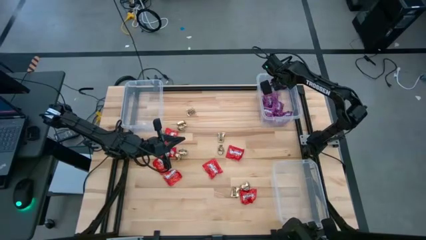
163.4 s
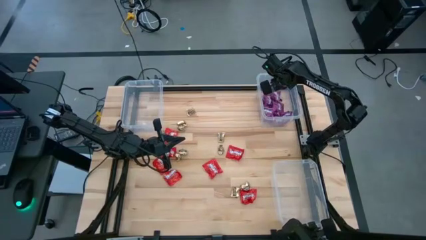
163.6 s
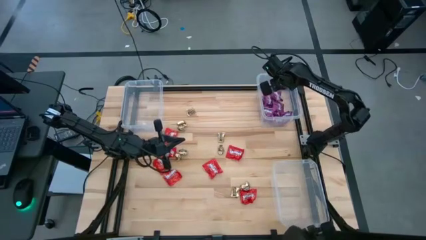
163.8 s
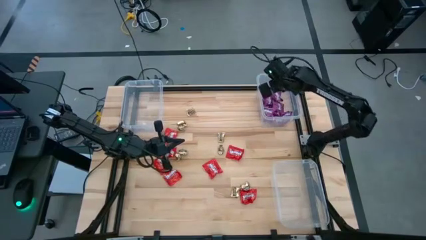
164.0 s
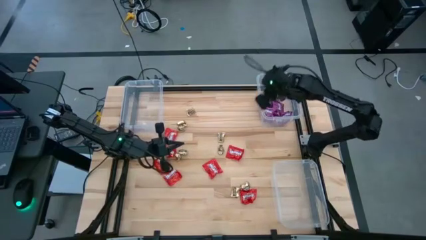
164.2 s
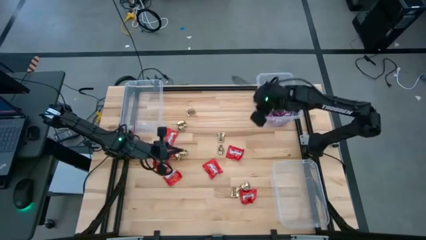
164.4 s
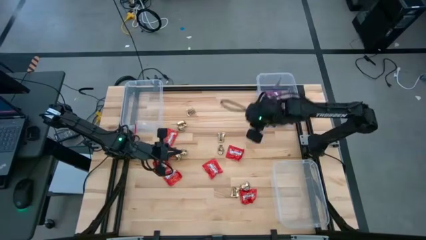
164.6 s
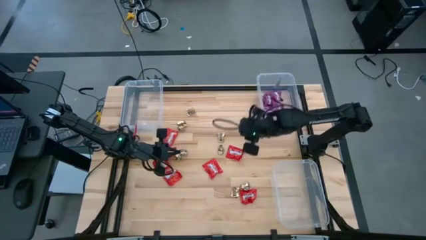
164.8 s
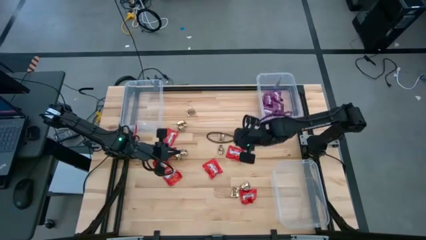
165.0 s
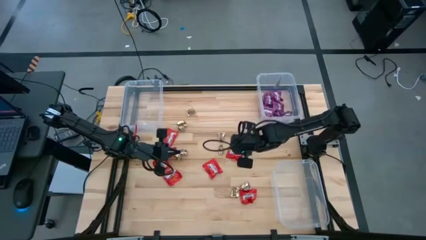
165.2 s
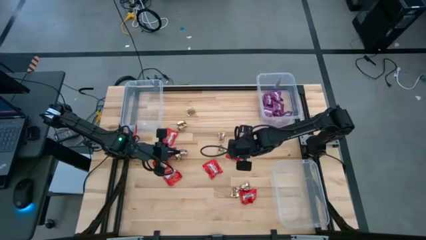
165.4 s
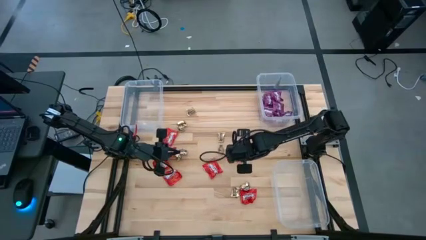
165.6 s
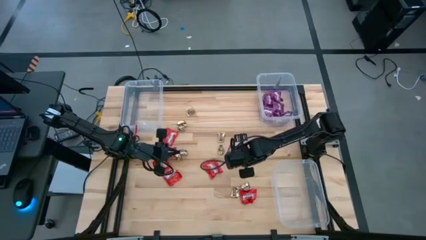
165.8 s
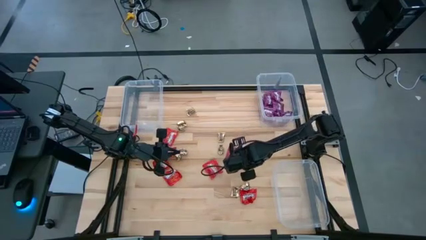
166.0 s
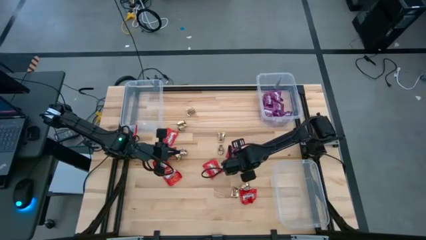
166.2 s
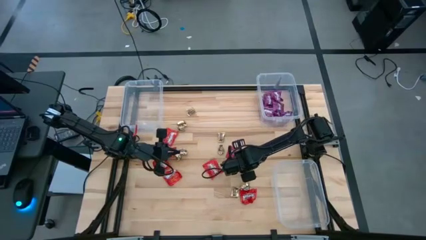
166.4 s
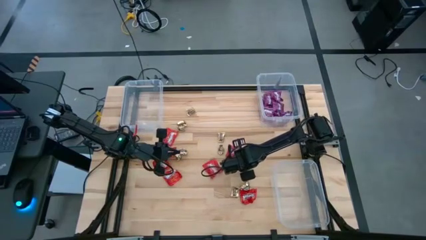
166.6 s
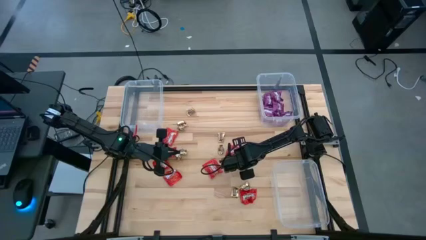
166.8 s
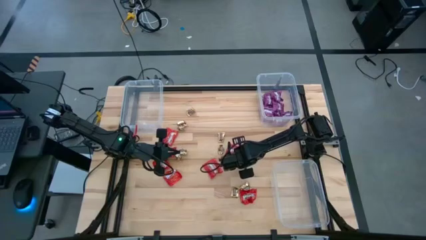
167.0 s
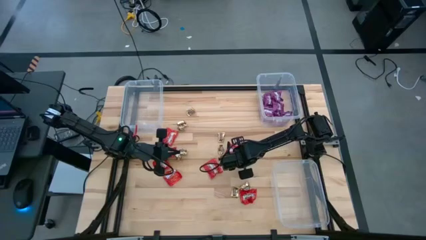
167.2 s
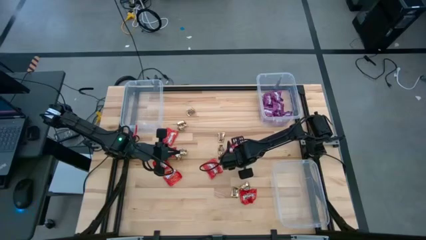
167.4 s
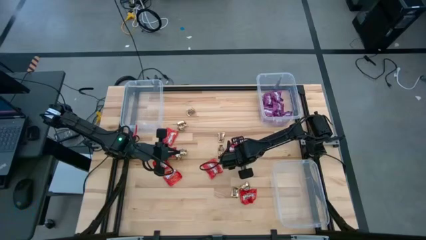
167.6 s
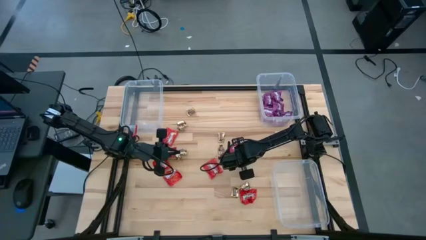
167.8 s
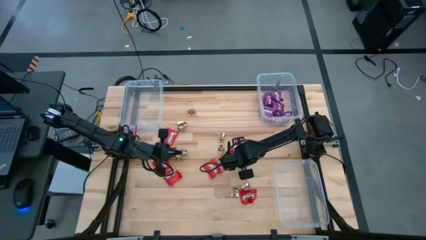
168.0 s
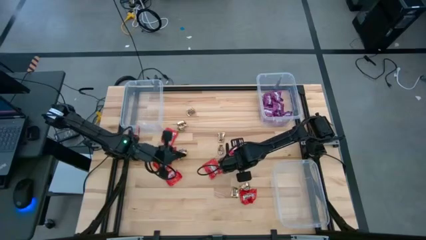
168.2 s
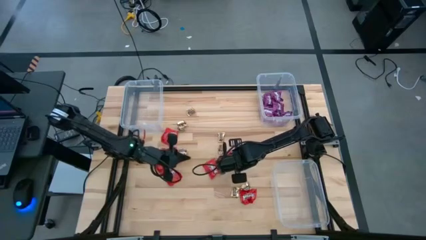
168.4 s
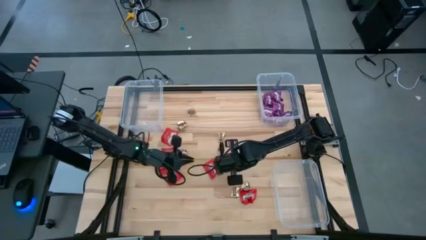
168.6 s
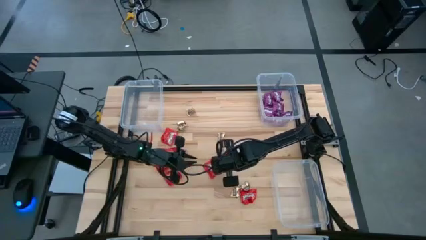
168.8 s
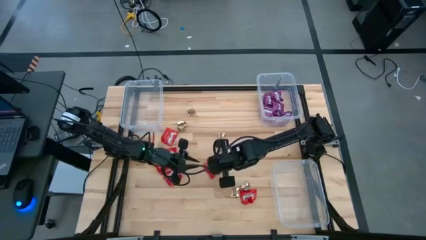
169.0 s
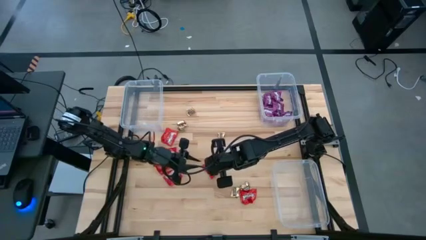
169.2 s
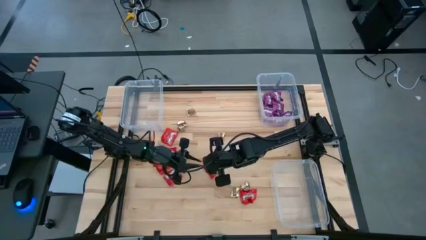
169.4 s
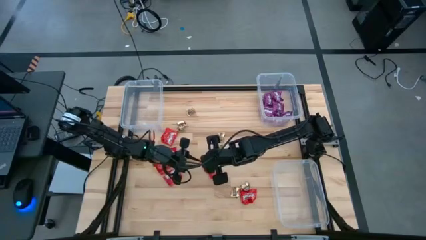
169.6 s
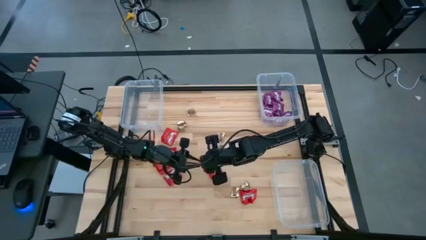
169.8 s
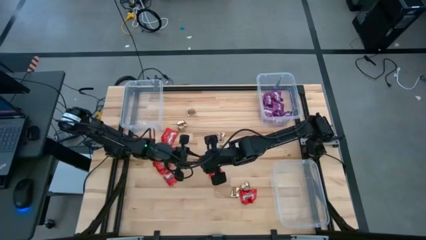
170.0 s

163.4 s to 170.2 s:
Task: Sort candy
Put the red candy into the top left transparent bin

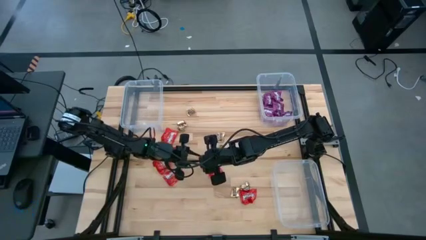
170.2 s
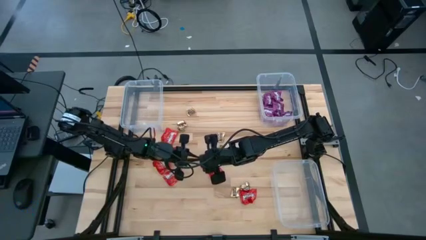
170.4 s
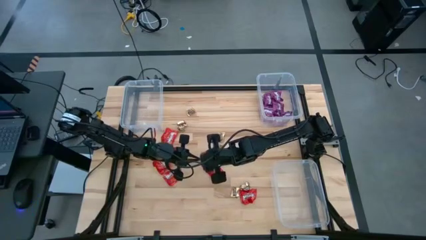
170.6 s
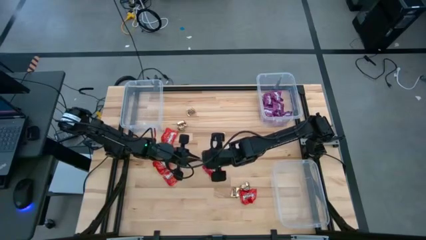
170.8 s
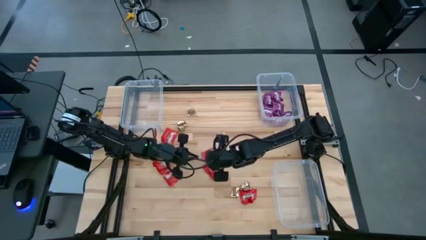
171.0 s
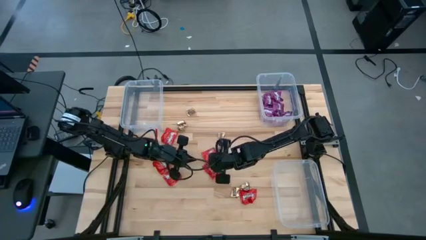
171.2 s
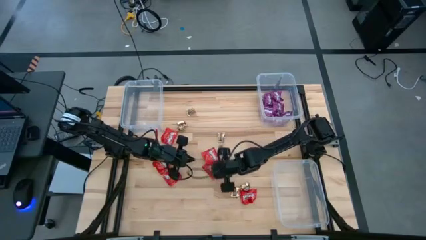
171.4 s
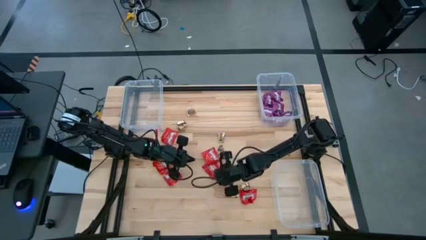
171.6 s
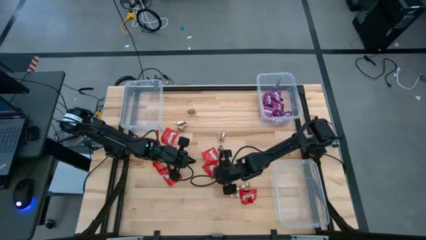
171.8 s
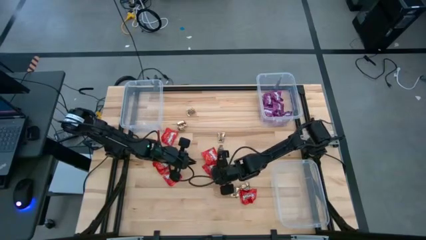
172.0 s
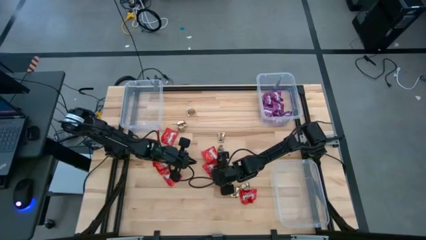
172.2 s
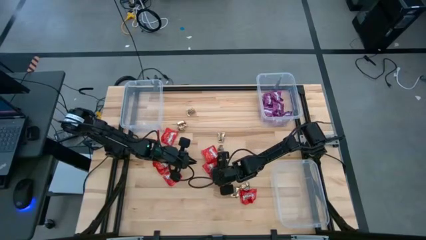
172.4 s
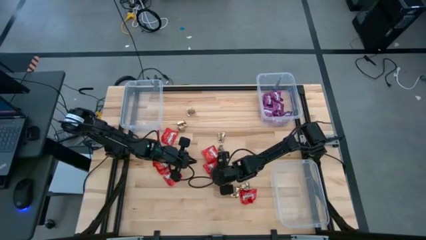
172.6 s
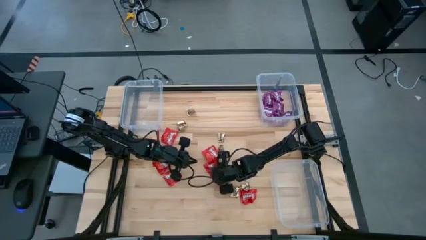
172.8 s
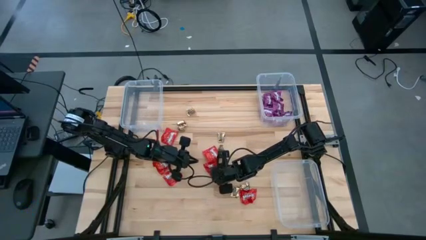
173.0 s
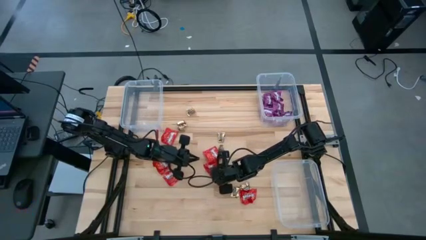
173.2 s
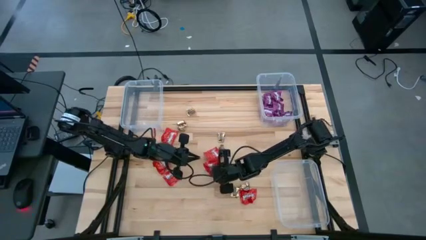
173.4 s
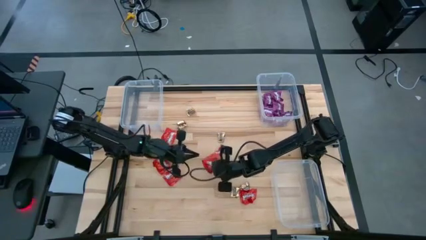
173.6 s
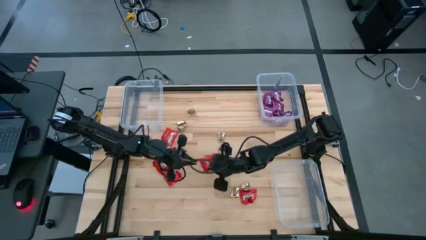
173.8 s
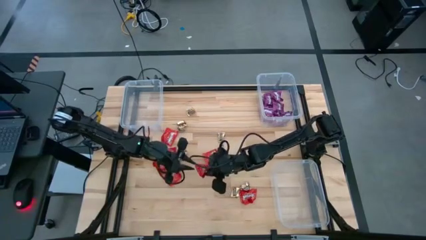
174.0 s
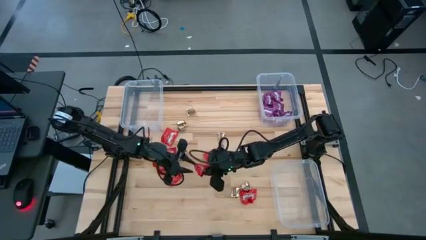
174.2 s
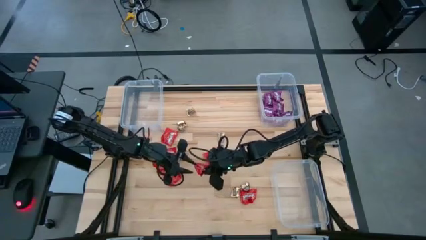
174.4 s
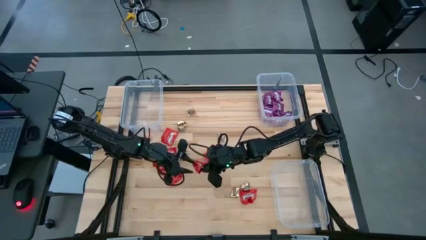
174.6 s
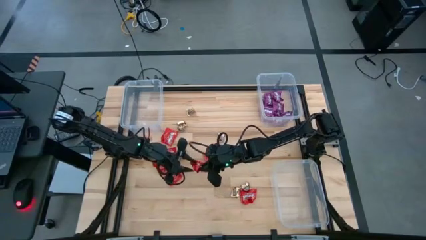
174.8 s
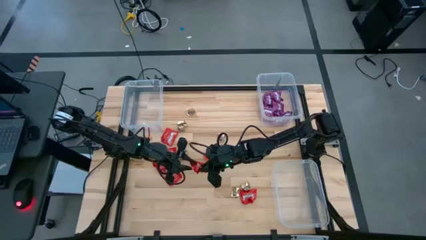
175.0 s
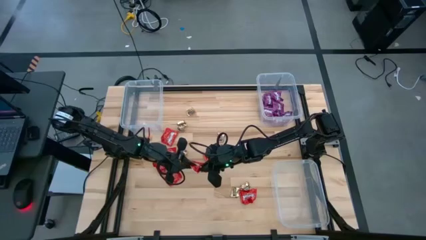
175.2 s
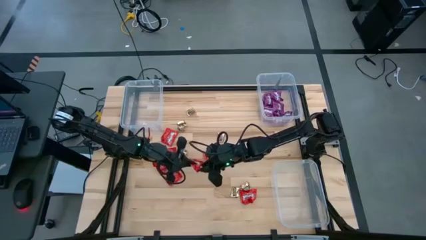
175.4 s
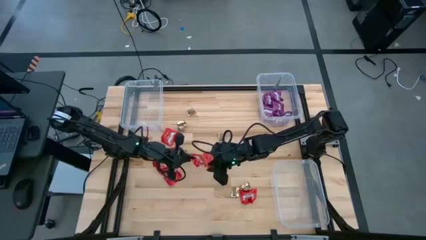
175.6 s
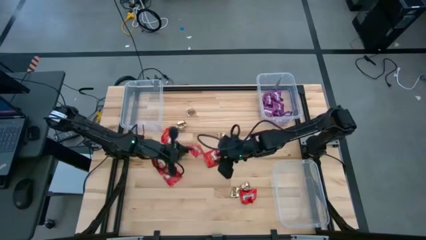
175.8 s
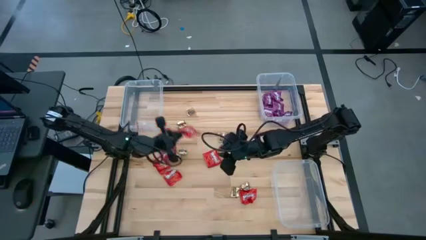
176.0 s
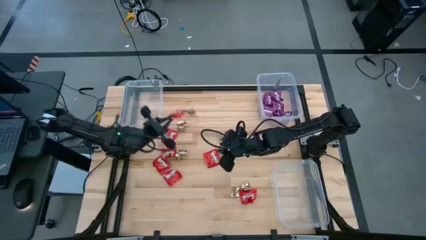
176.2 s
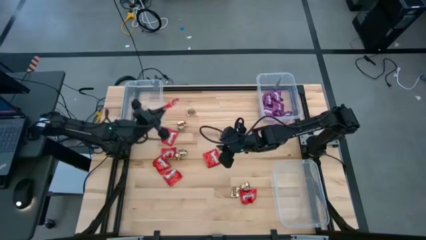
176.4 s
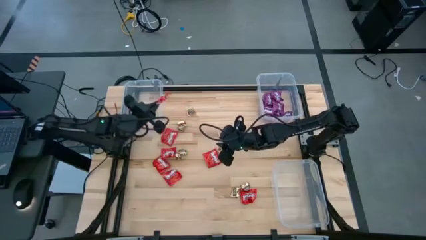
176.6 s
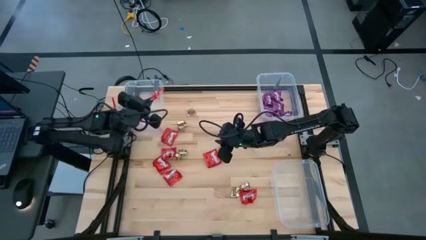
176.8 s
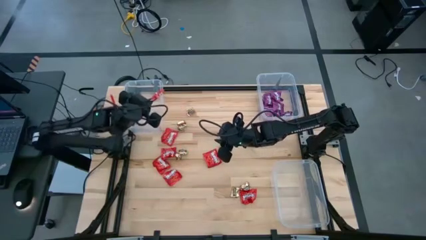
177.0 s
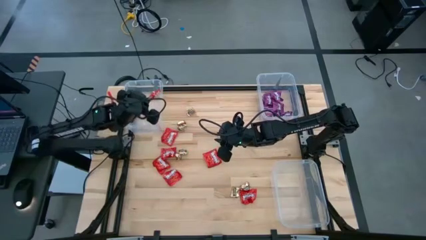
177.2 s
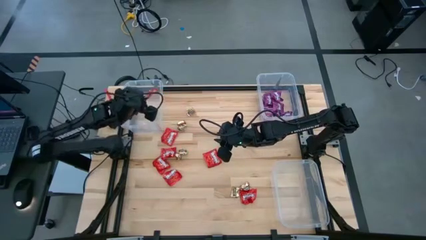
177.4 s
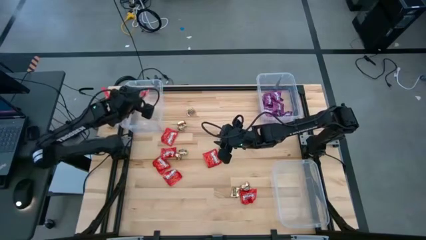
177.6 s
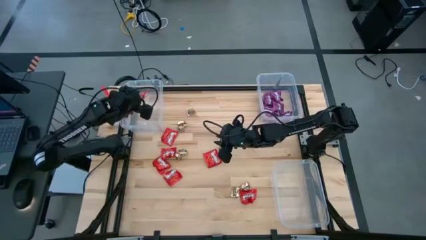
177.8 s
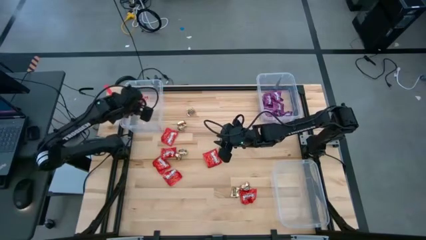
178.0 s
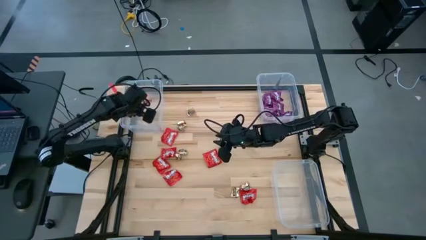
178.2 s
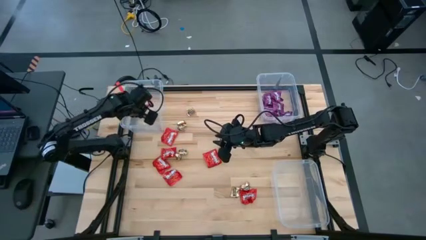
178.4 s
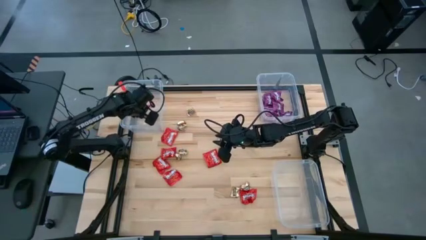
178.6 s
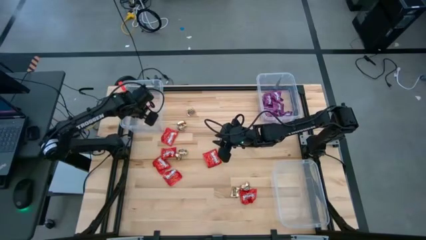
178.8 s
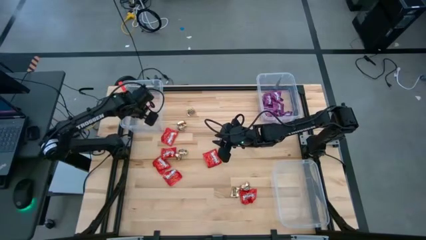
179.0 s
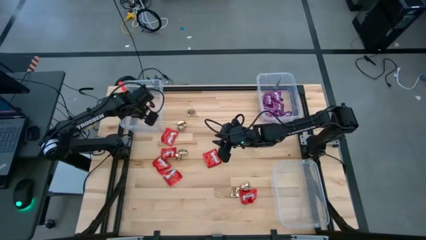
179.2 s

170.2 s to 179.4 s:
Put the red candy into the top left transparent bin

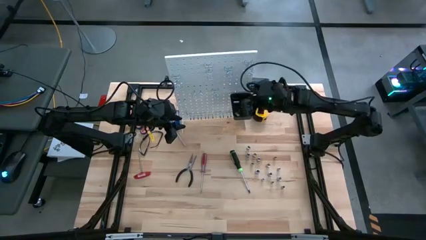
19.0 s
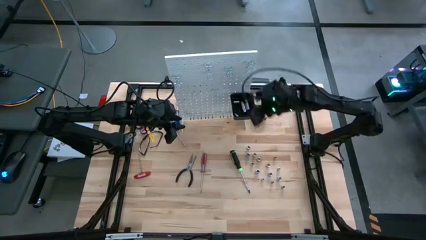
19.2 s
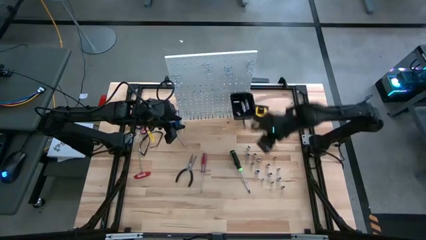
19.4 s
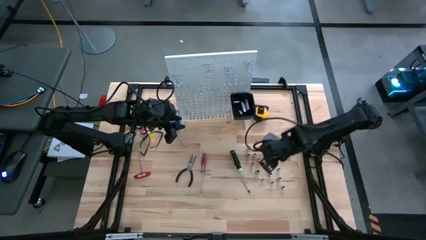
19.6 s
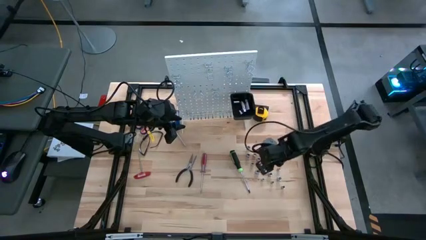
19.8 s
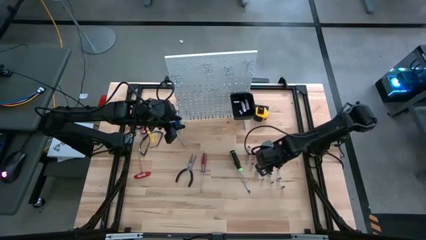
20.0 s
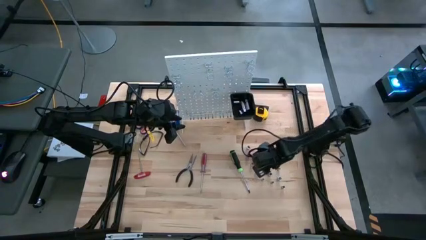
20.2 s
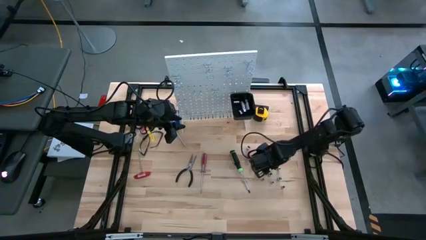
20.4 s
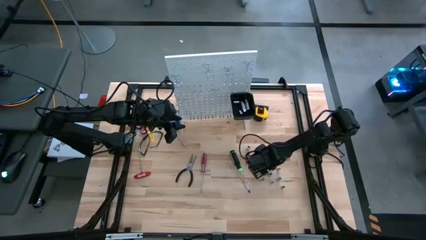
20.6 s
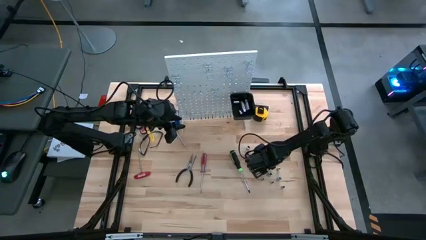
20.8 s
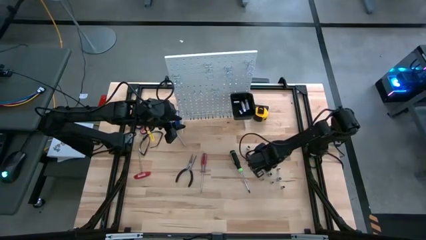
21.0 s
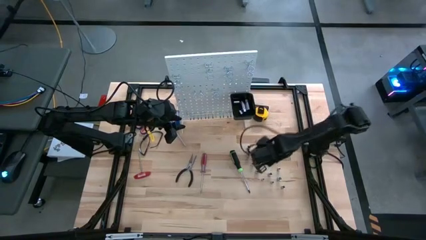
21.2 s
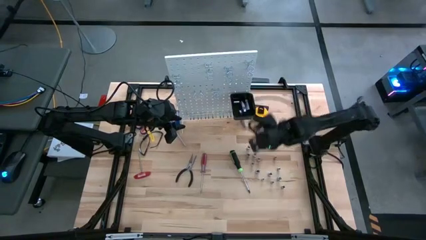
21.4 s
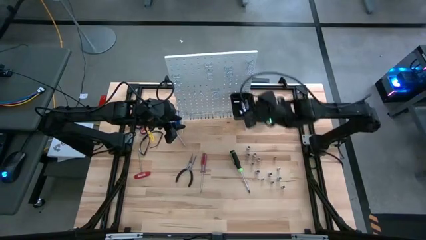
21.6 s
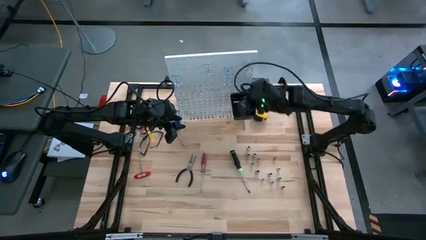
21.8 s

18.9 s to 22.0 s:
Task: Hang tools onto peg board
Put the silver socket into the black bin on the peg board
